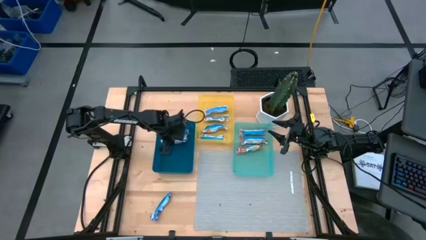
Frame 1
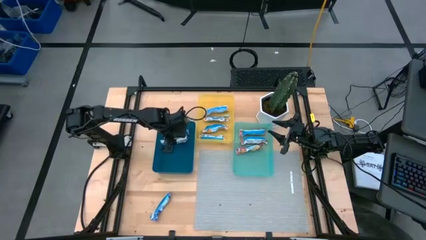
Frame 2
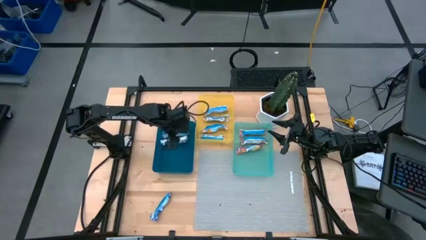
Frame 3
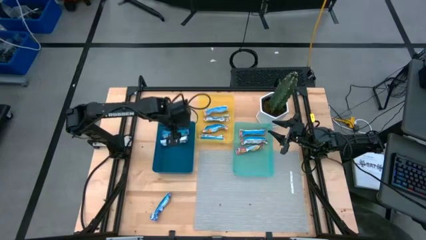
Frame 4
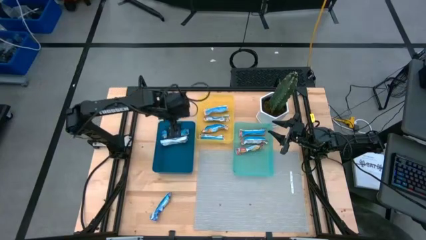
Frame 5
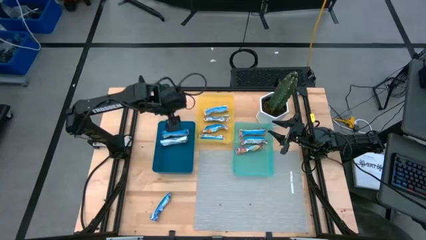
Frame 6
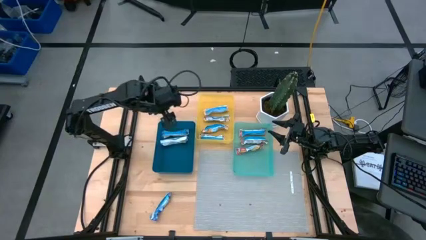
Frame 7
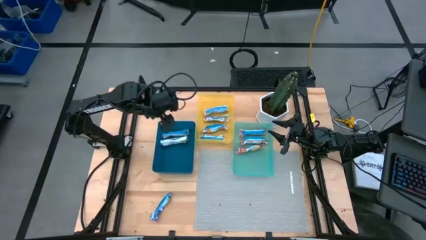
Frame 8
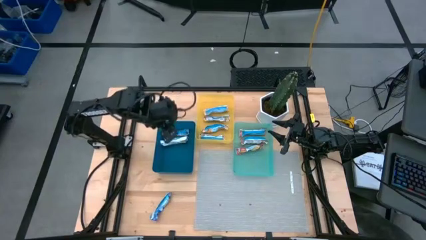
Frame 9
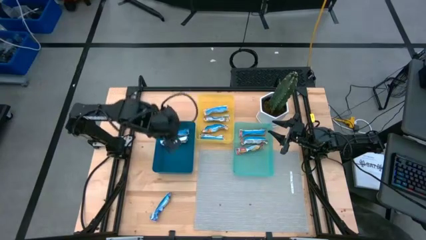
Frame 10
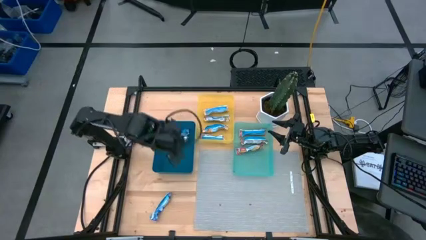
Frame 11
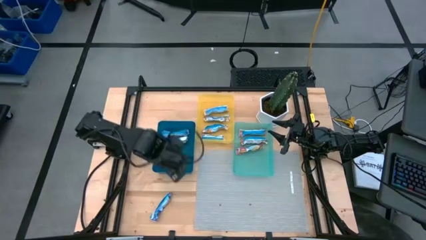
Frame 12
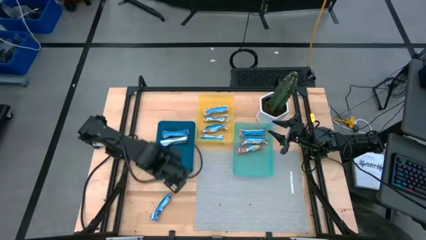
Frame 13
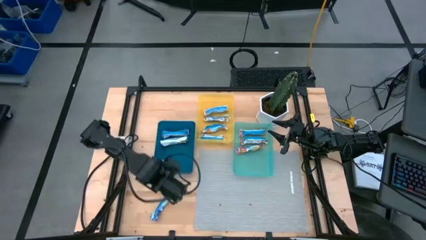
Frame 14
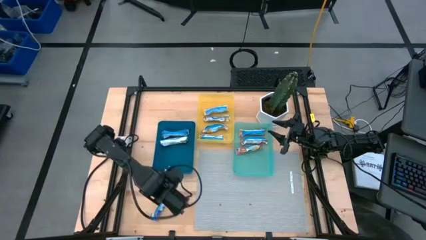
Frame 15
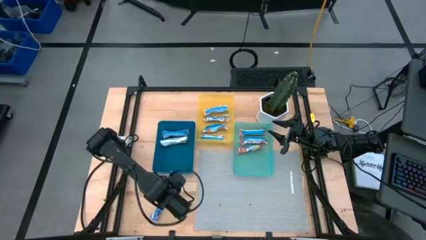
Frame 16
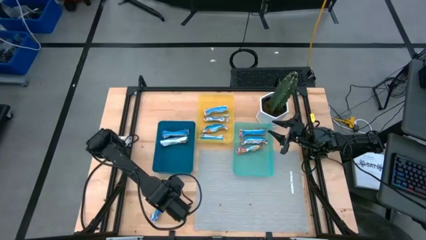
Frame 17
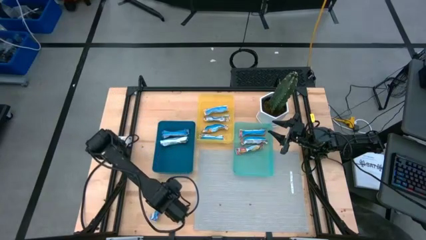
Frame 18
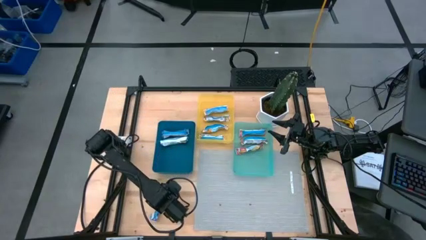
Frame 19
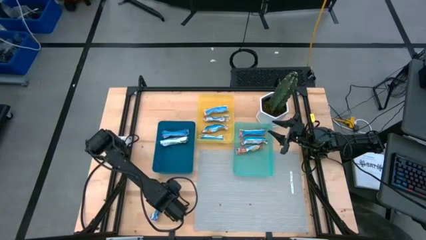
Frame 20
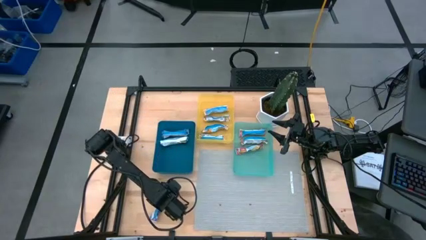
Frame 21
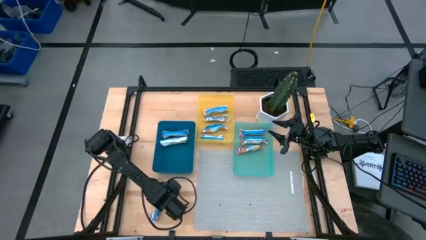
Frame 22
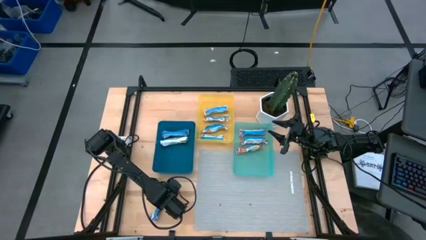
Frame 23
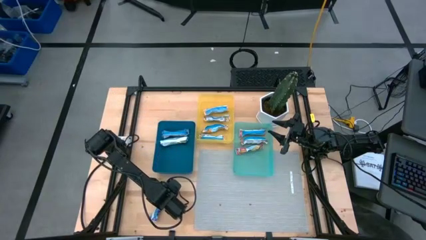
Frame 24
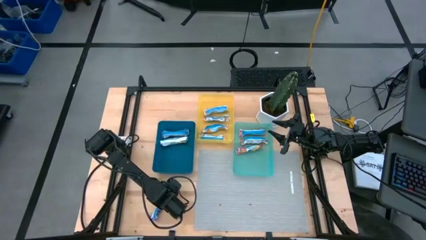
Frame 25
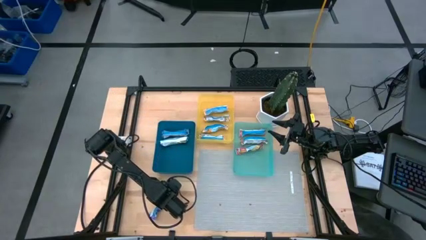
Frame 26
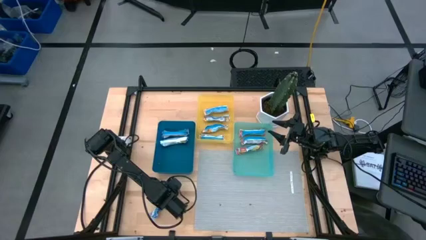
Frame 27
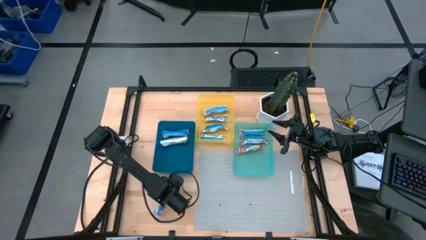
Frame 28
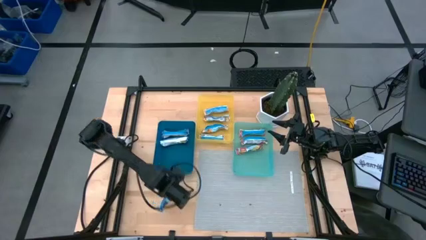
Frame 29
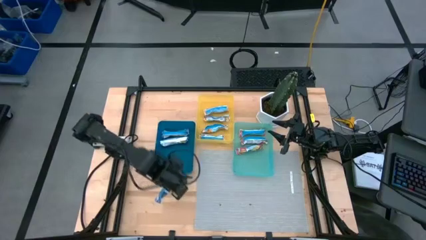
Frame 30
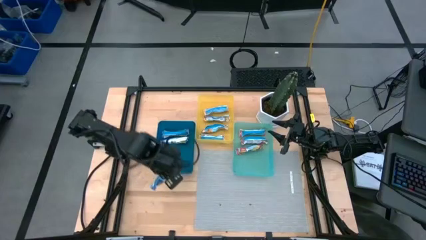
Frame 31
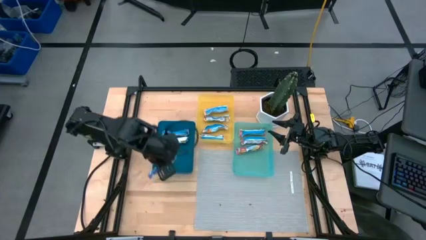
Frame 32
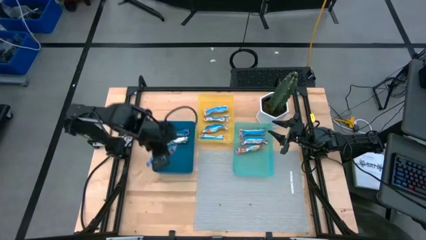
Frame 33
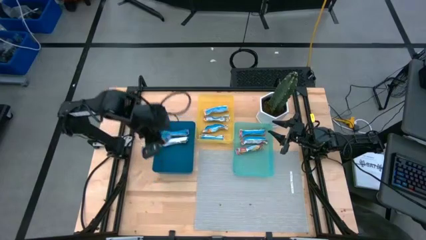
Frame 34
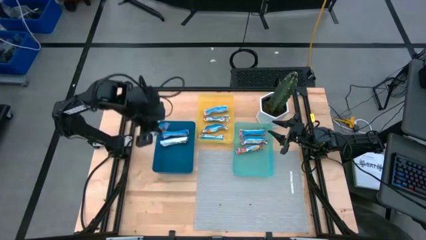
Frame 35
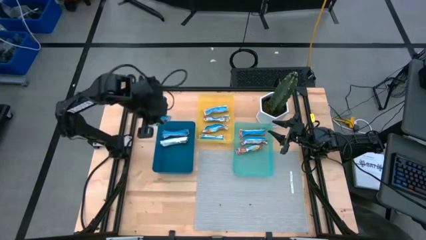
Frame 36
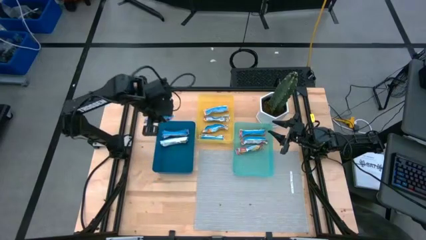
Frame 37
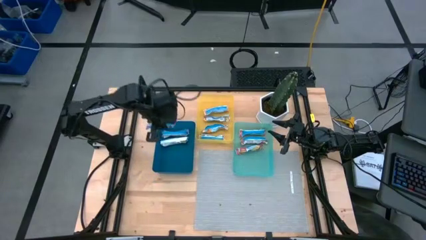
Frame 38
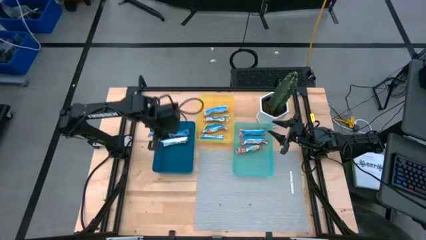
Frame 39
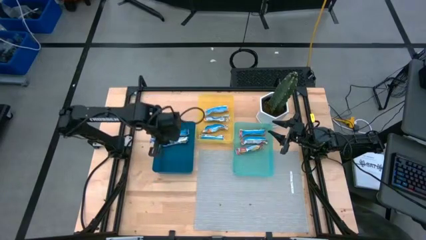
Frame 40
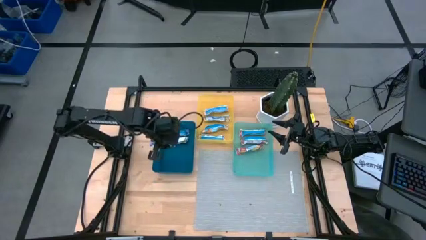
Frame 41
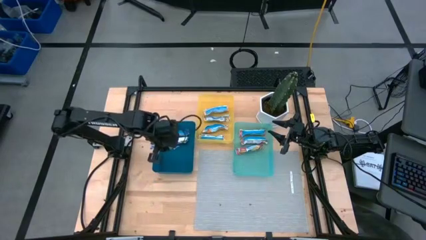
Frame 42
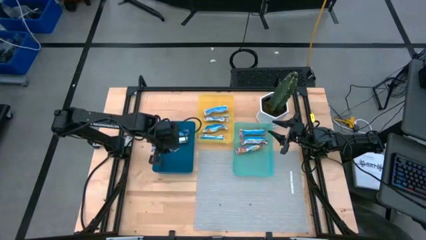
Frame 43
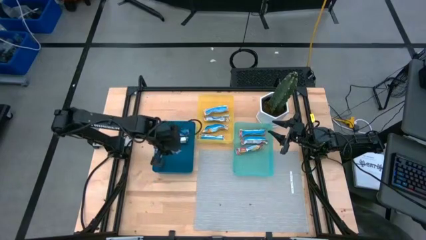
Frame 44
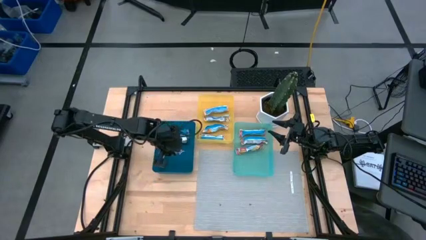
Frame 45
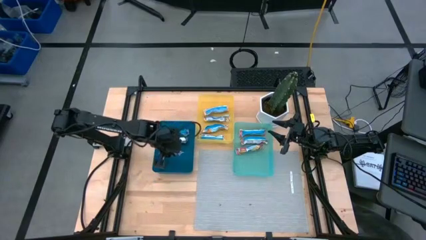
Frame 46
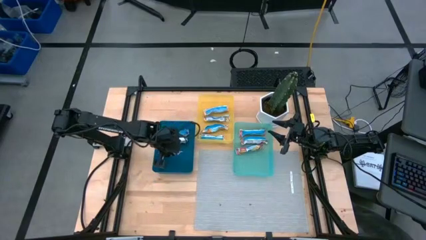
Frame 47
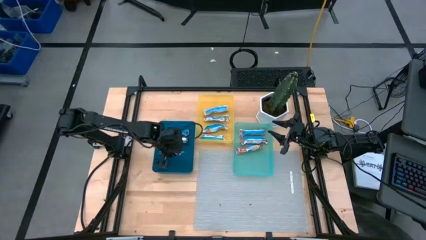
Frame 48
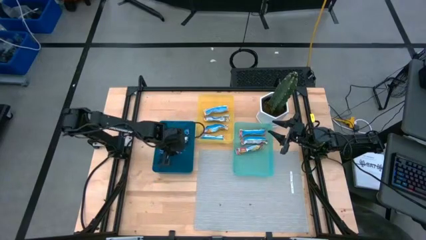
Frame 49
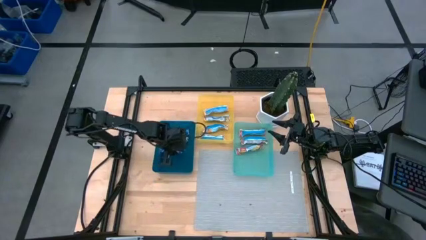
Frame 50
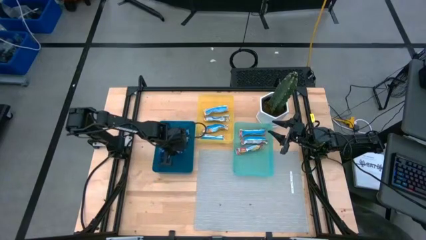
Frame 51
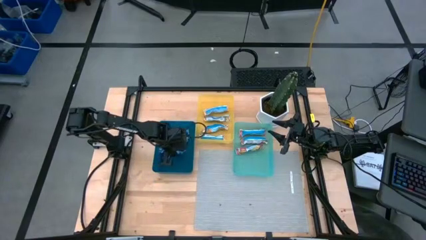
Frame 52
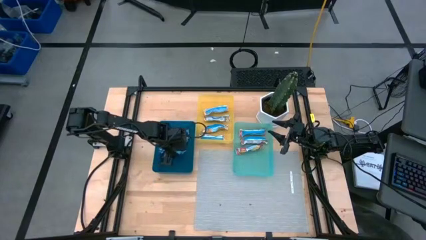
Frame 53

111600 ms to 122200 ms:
Task: Pick and place Granola Bars by type
Put the blue granola bar into the blue bin

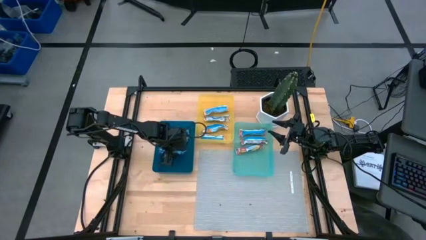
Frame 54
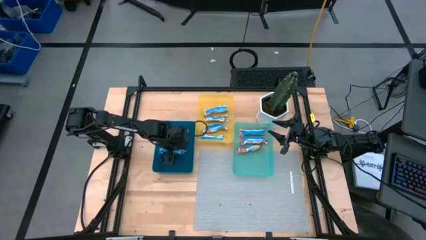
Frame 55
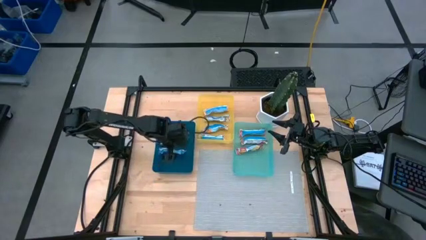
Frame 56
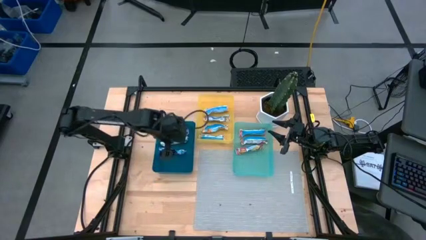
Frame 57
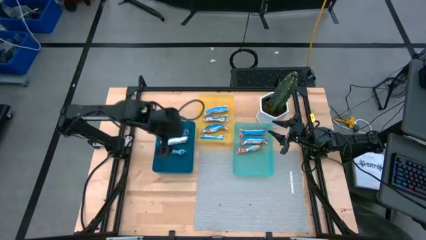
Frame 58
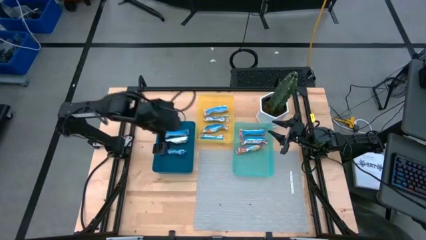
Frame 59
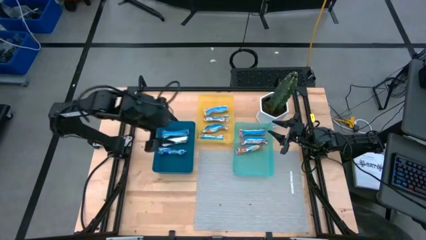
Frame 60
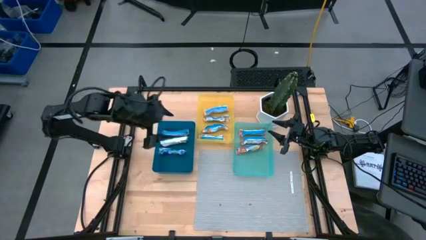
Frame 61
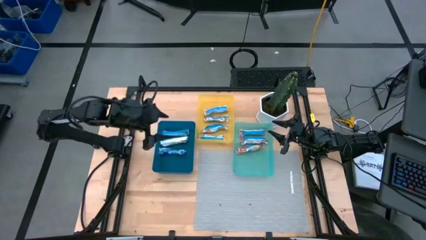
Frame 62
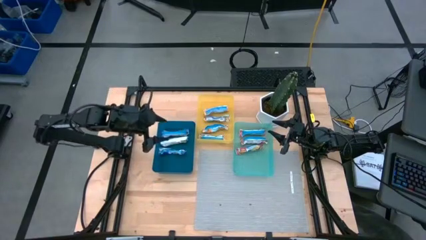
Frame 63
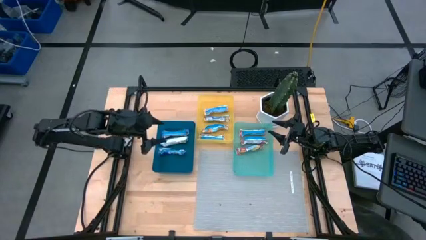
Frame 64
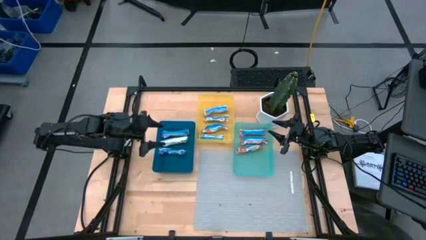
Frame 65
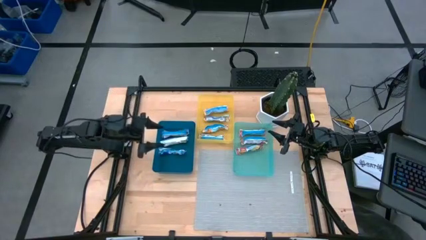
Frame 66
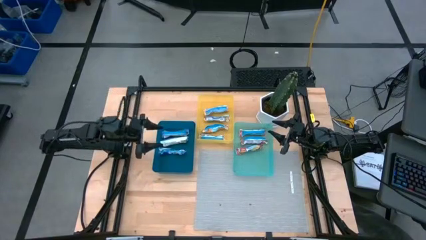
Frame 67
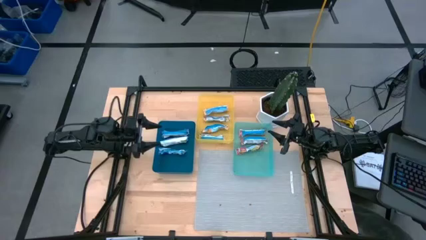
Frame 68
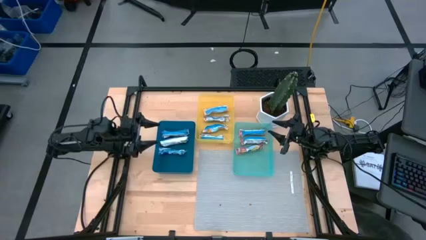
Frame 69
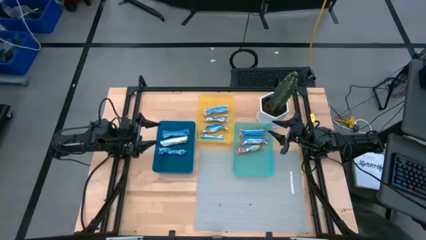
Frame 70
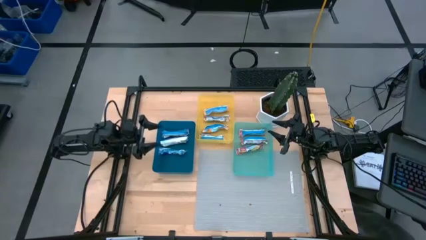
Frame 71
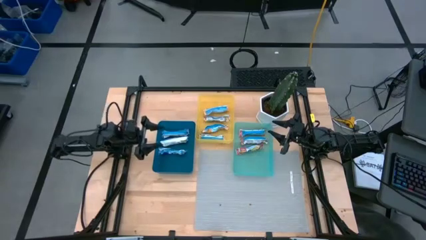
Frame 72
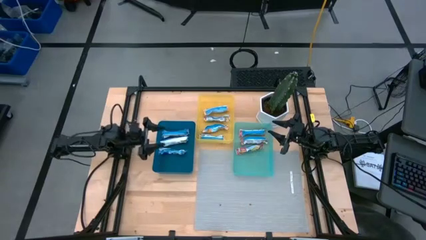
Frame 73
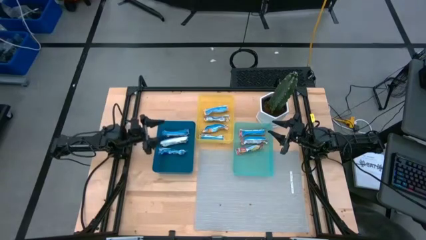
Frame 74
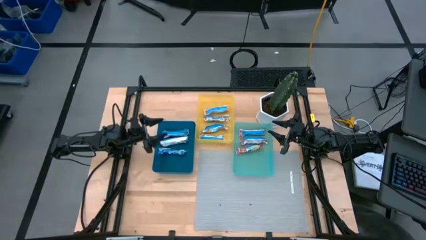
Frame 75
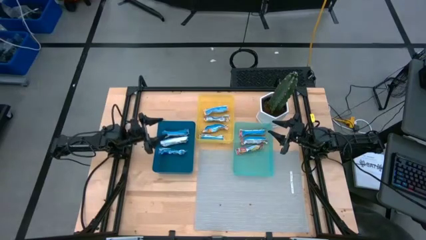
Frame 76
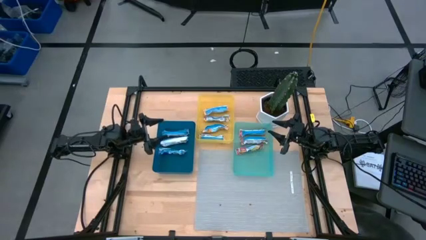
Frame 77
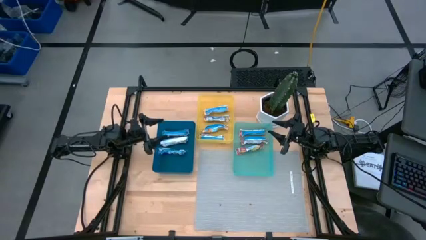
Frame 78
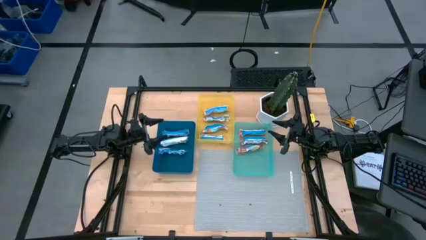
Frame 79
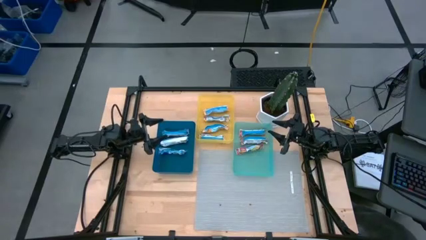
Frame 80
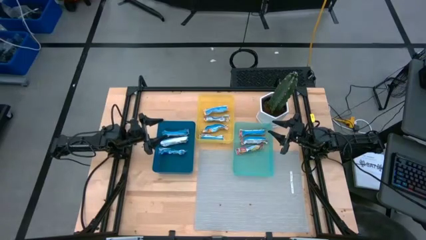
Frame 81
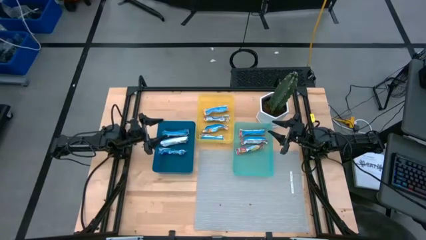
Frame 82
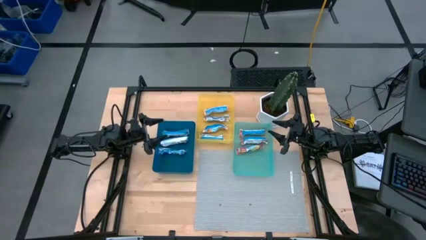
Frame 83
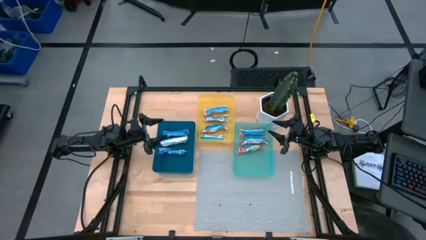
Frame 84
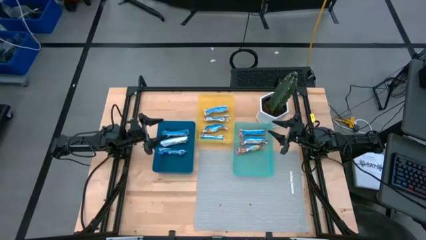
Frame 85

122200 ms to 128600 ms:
Return to Home Position
